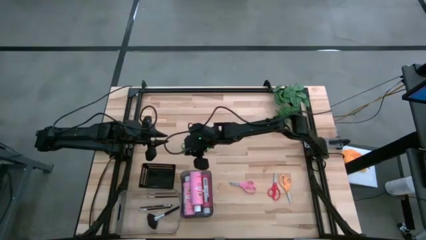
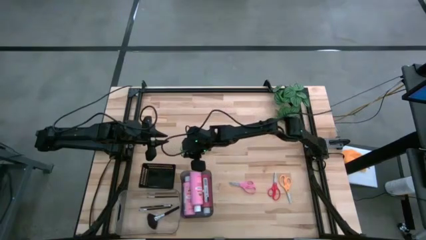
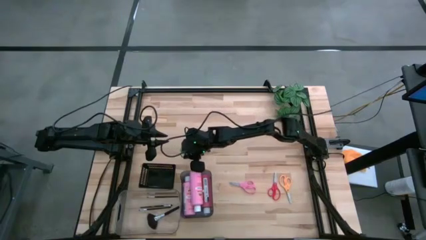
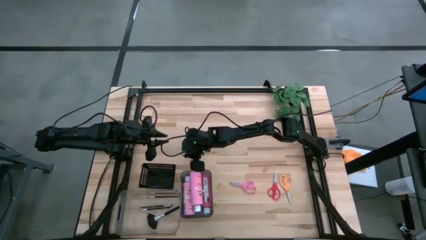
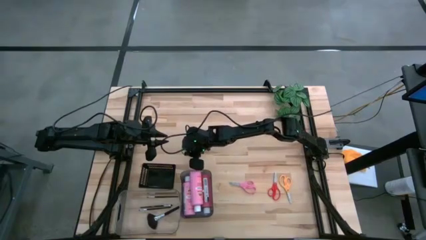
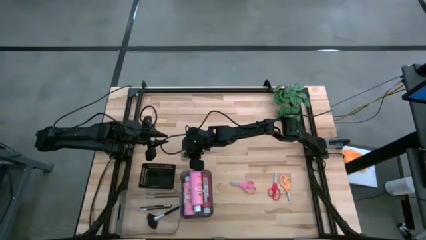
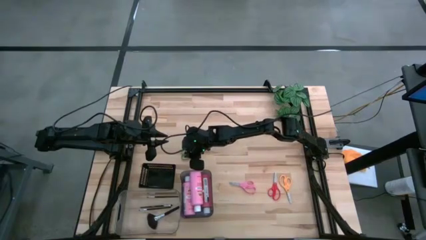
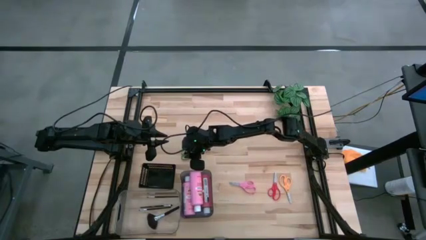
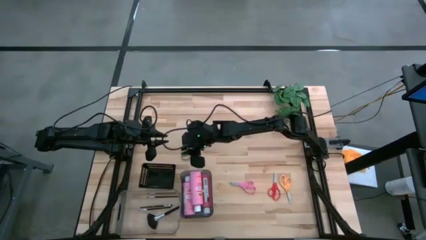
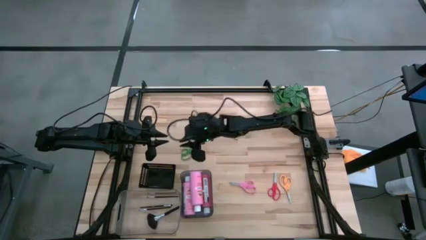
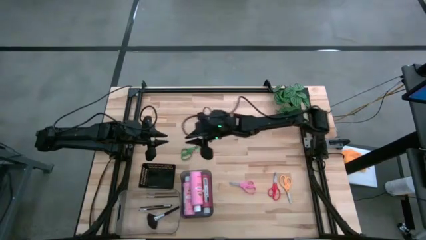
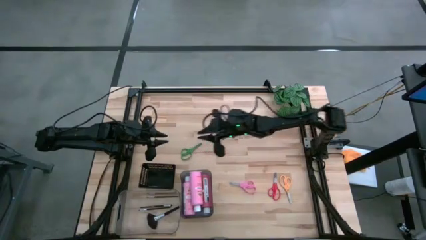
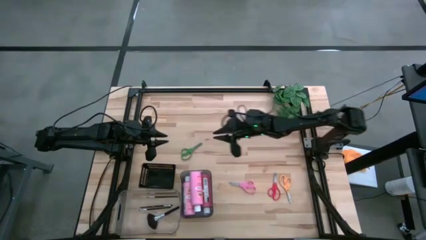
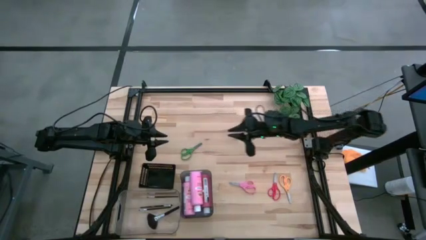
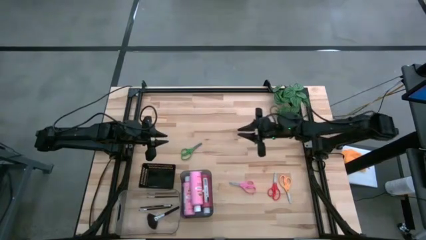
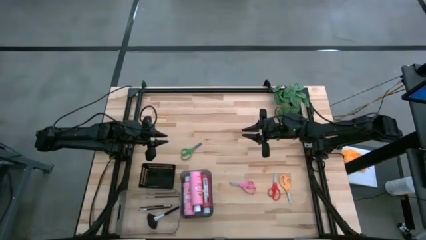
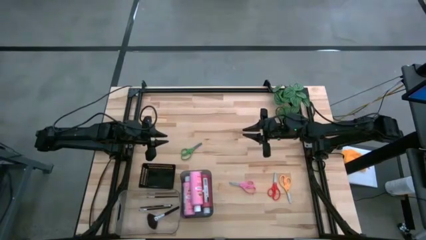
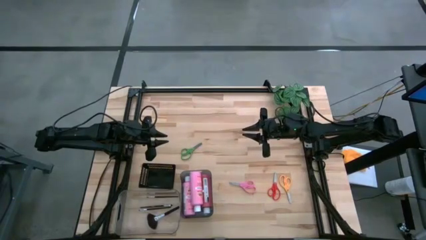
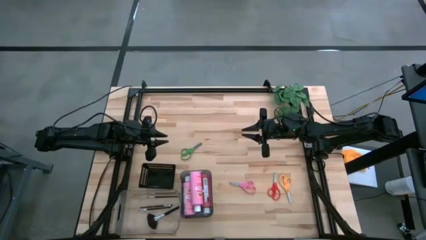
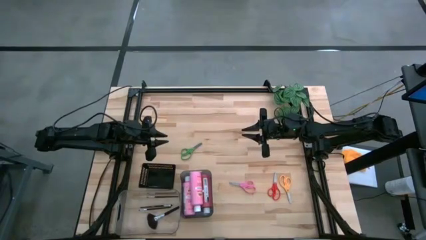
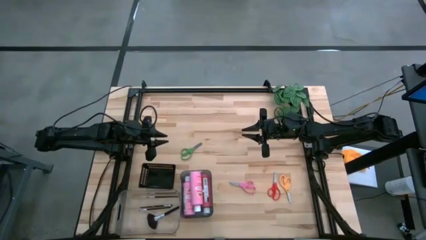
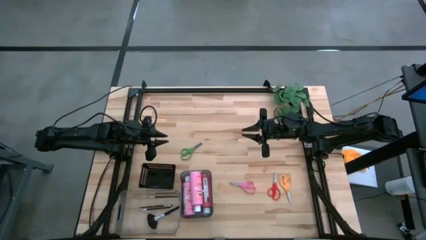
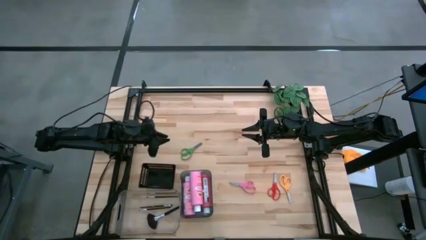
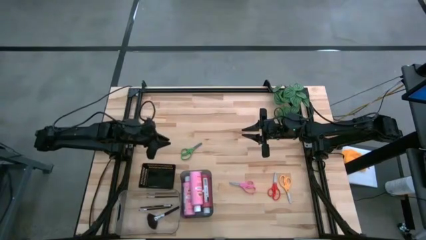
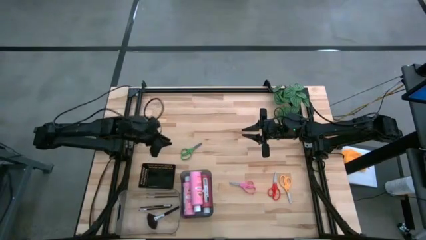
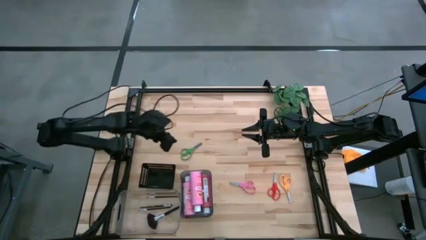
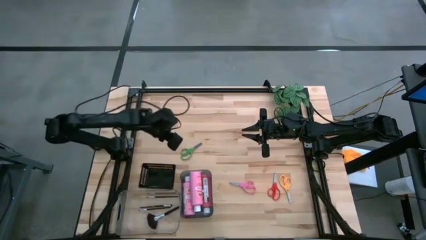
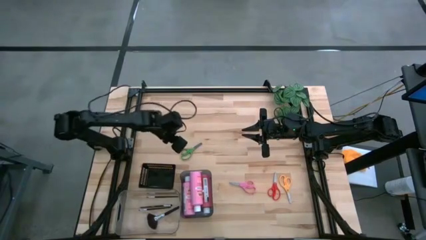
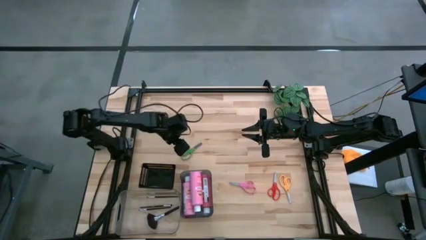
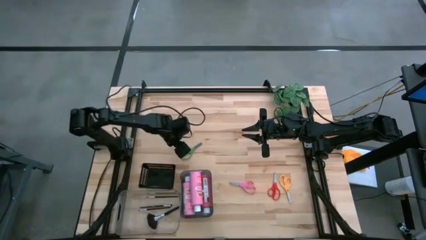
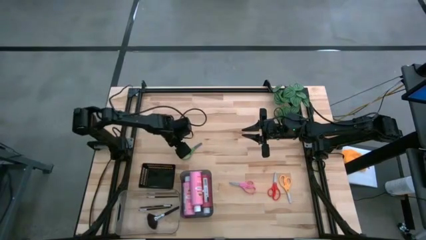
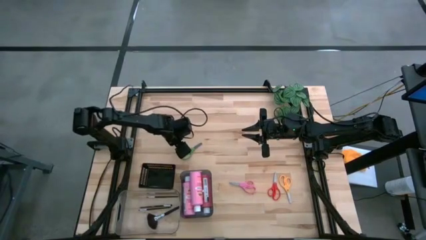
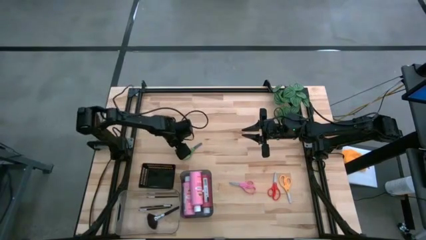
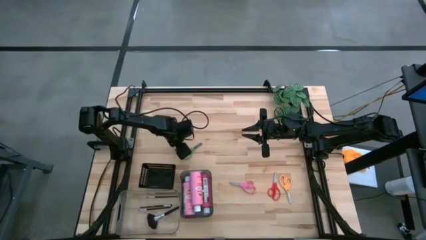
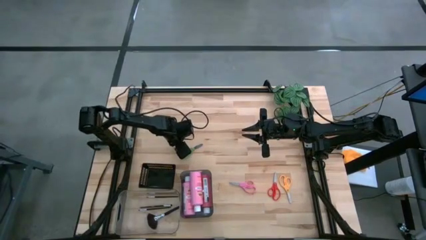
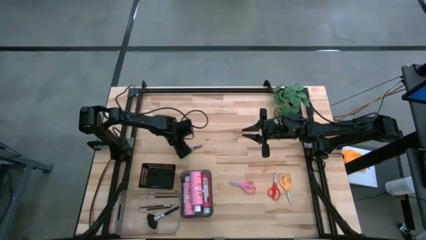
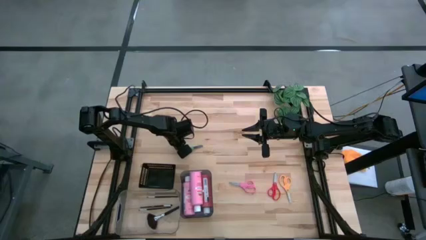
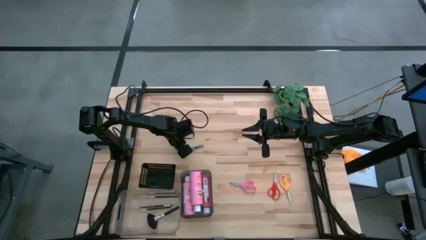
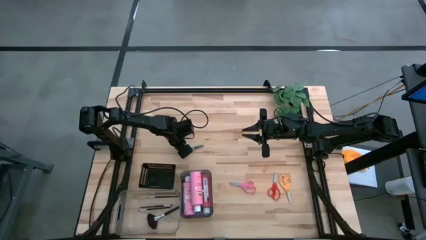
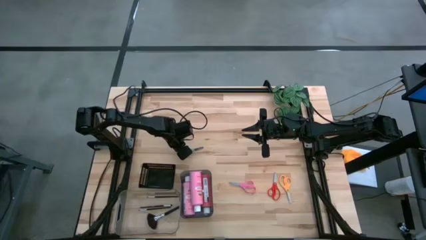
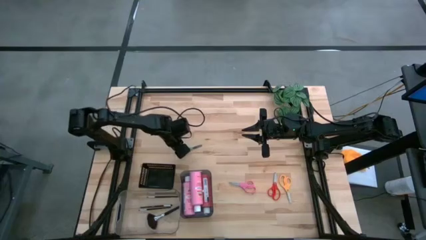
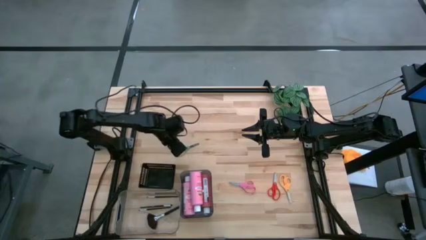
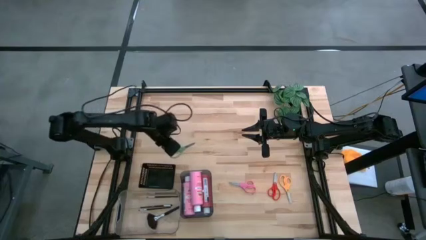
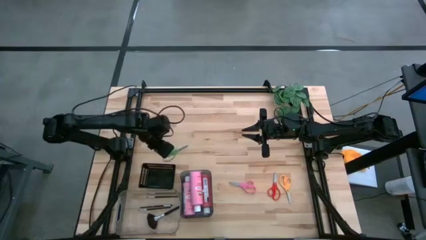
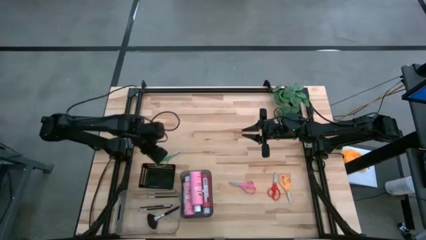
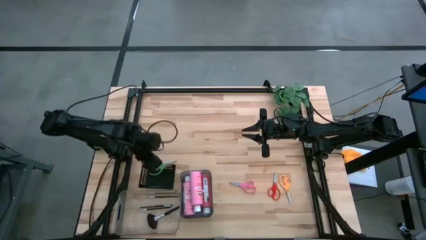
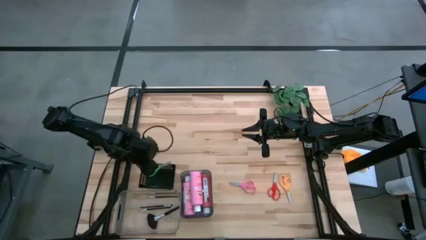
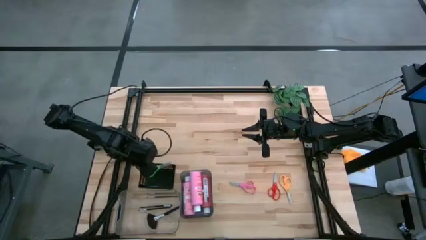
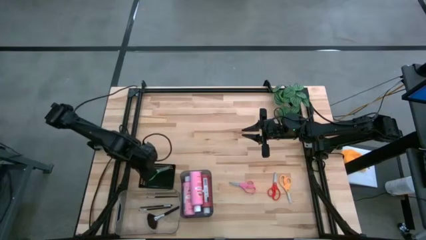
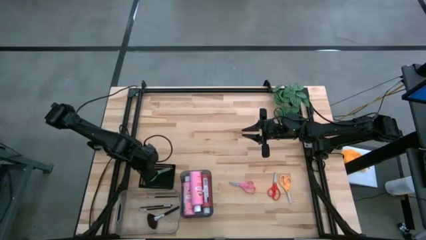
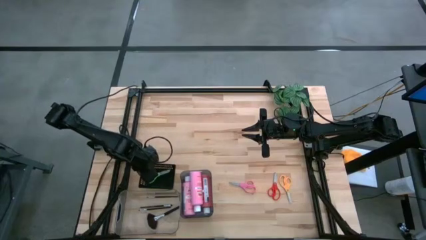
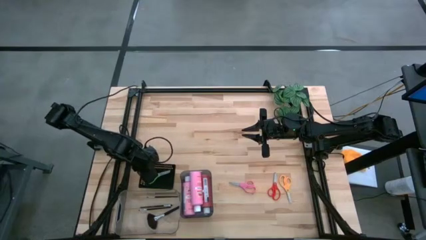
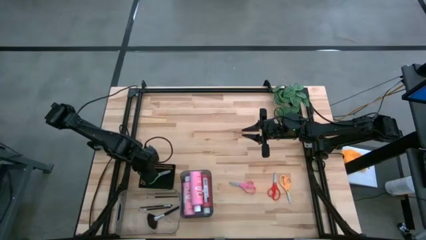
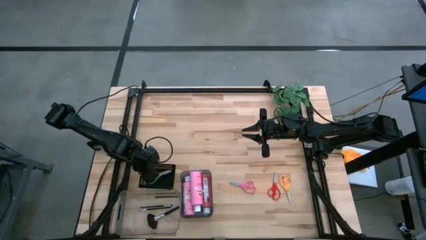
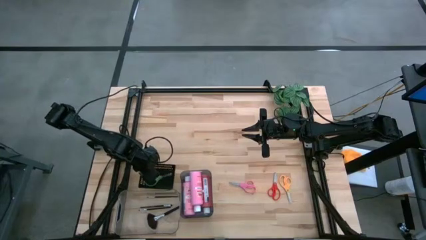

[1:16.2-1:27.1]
Task: Pick & Place Paint Supplies
Put the green scissors into the black bin

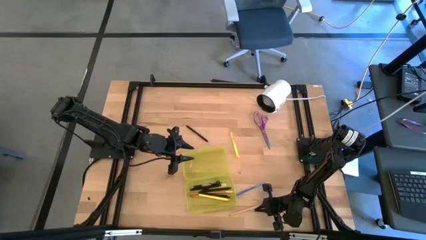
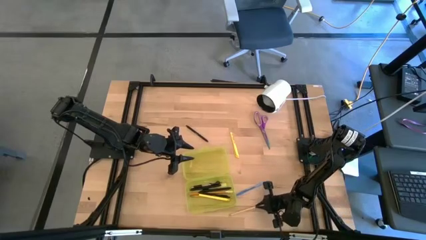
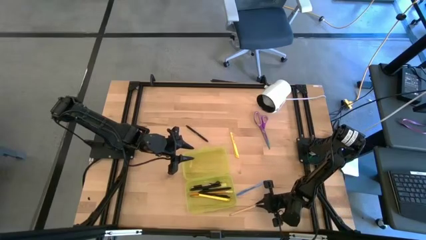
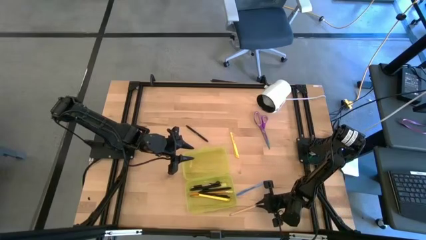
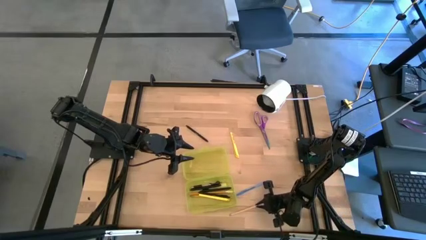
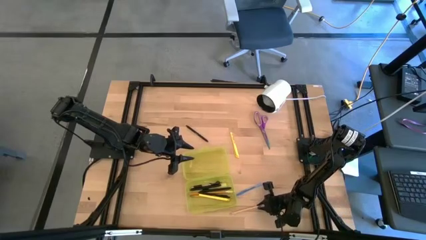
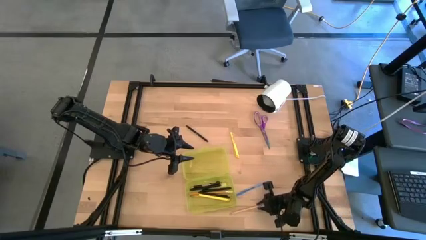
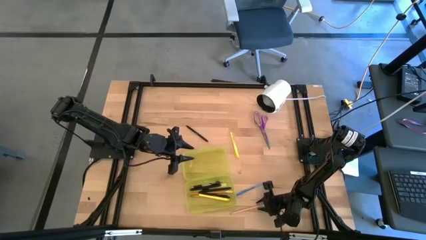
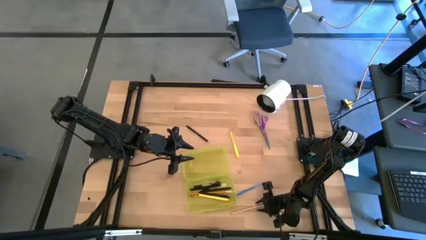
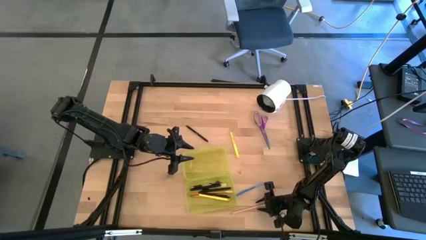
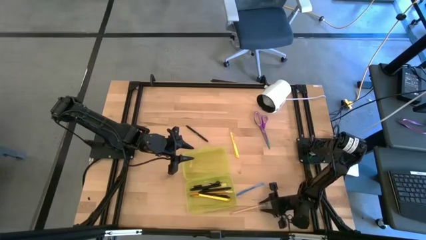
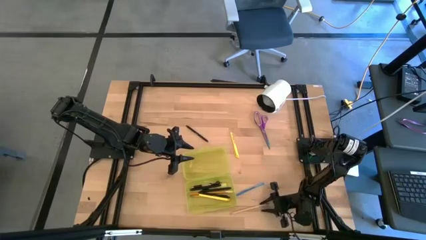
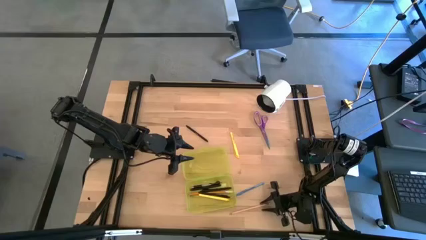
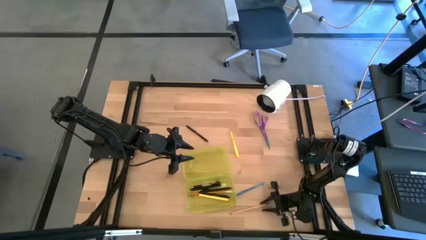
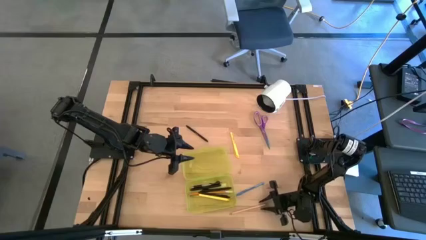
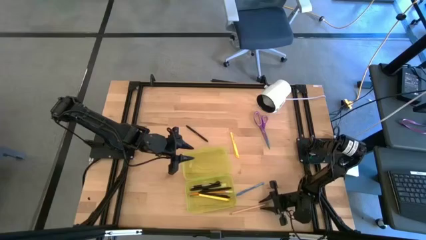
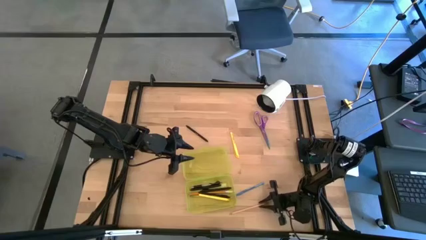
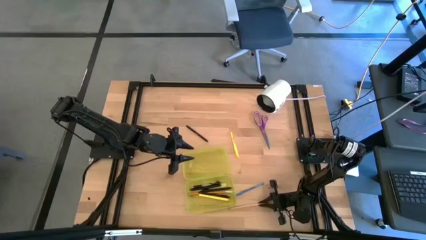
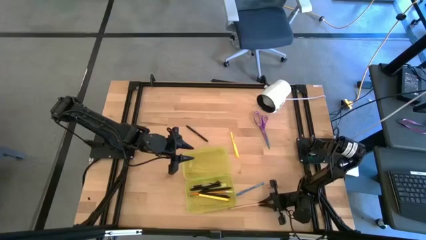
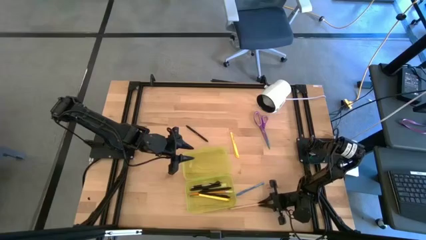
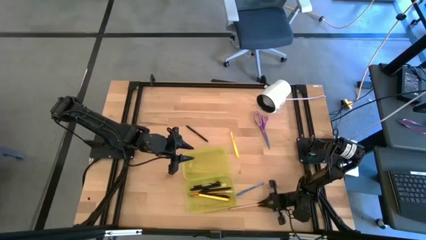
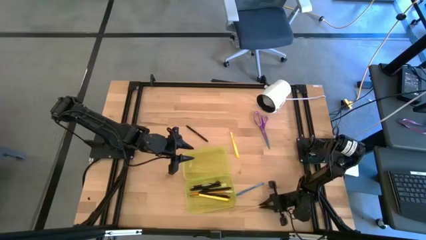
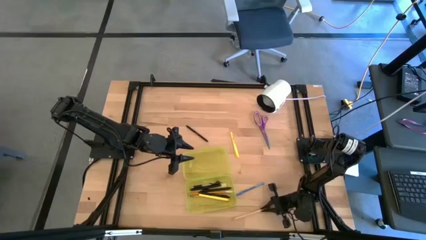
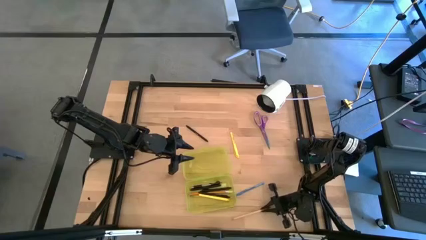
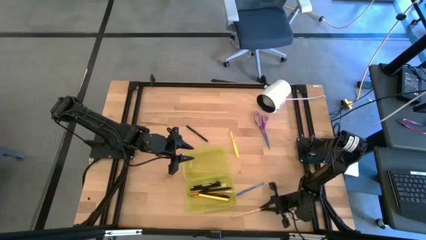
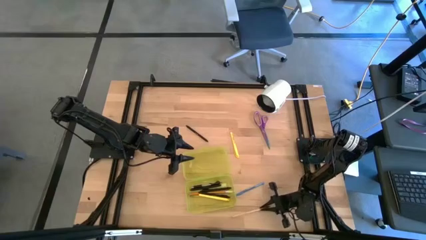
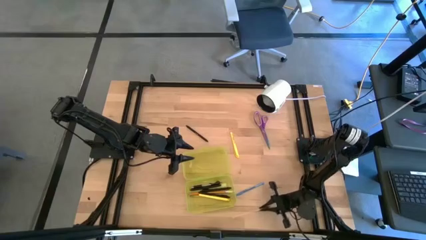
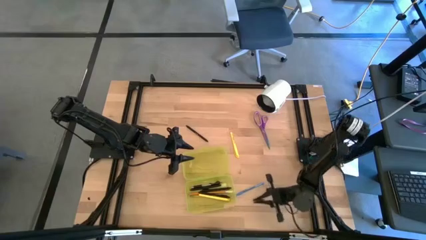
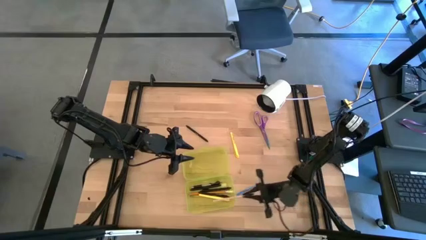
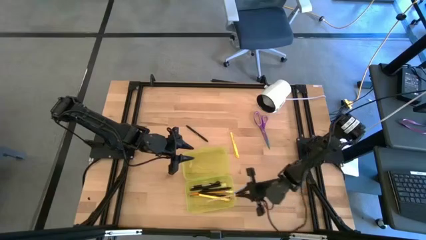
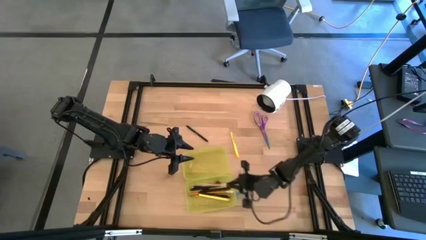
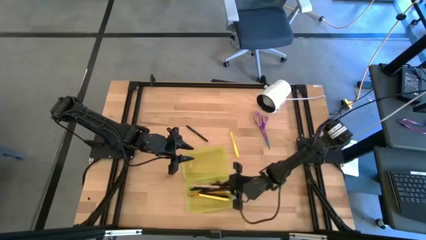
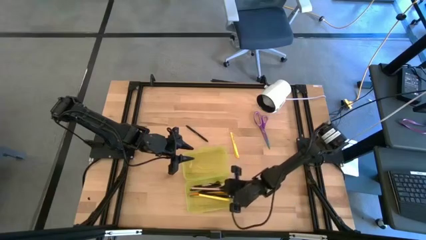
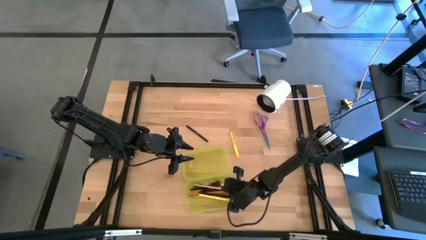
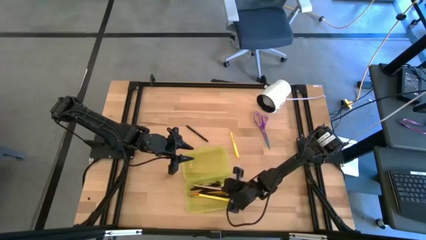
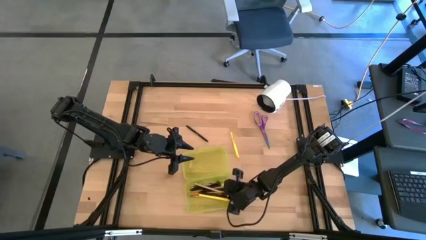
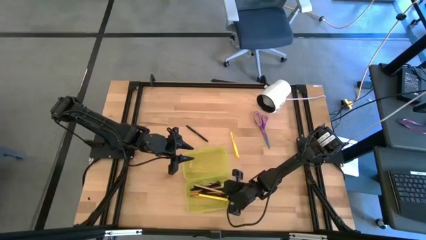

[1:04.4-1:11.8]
Task: Pick & place school supplies into a supply box
Put the pink pencil into the yellow supplies box
